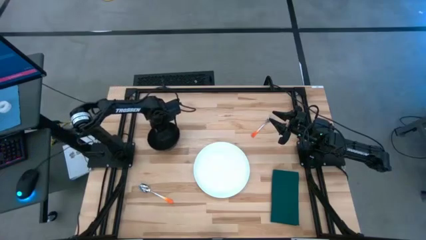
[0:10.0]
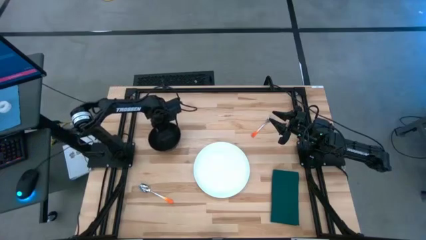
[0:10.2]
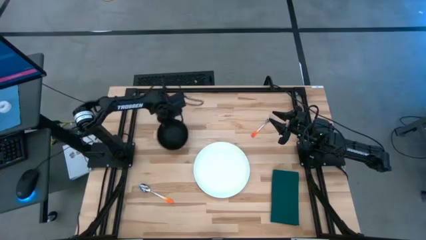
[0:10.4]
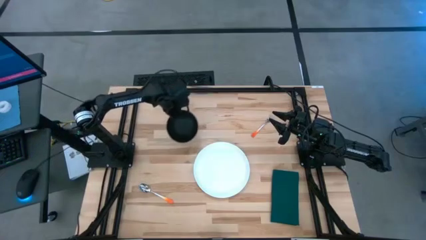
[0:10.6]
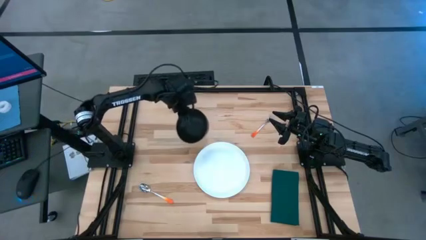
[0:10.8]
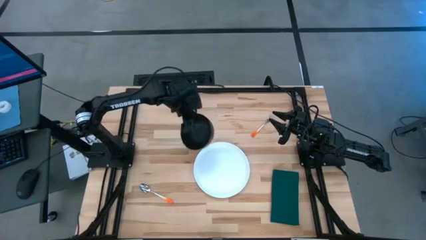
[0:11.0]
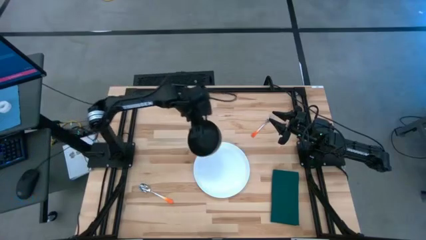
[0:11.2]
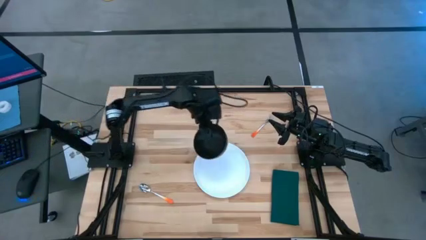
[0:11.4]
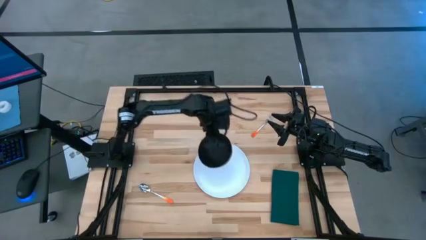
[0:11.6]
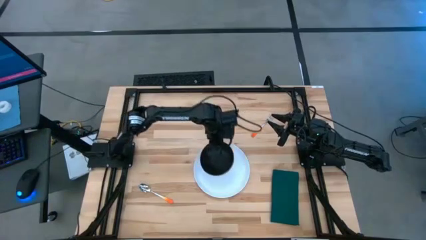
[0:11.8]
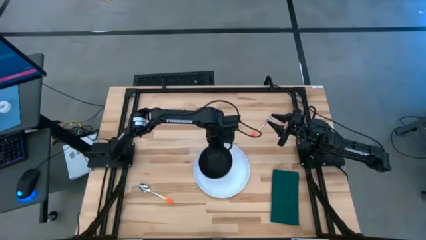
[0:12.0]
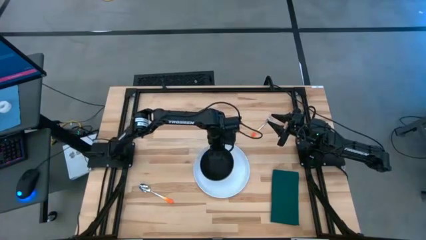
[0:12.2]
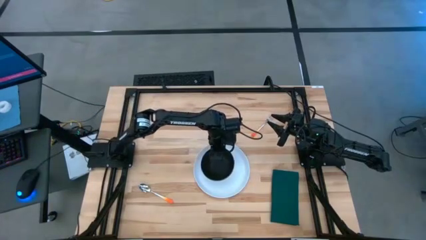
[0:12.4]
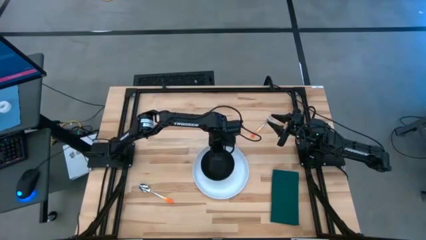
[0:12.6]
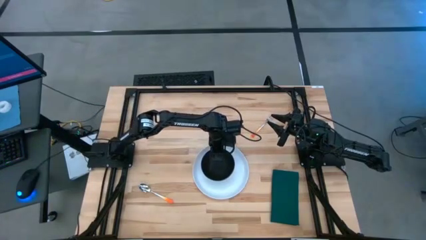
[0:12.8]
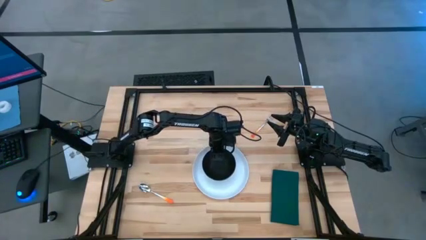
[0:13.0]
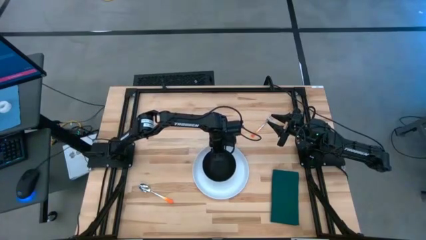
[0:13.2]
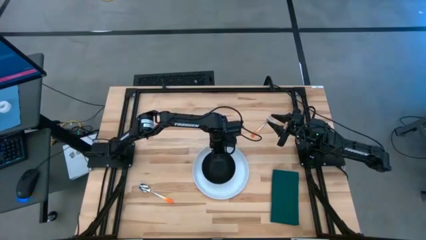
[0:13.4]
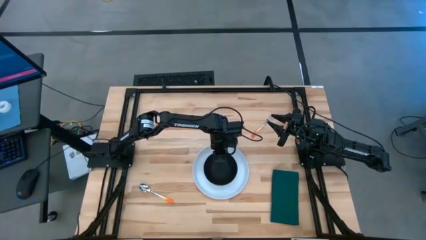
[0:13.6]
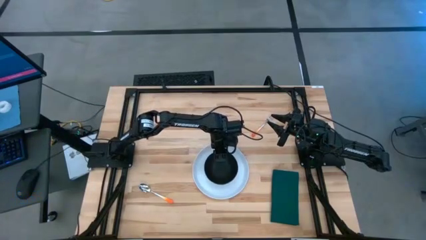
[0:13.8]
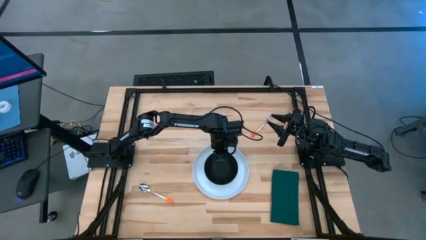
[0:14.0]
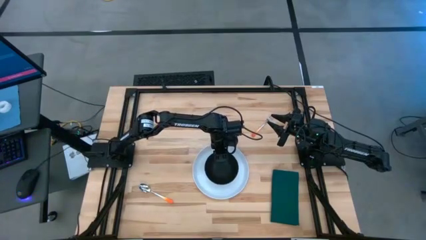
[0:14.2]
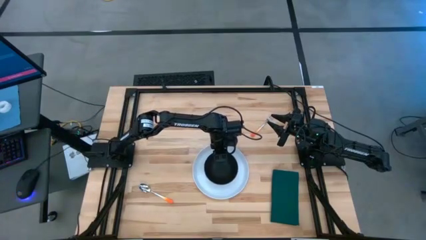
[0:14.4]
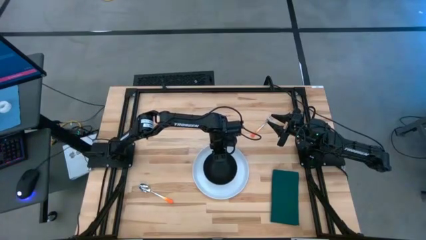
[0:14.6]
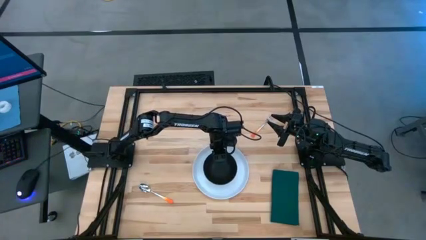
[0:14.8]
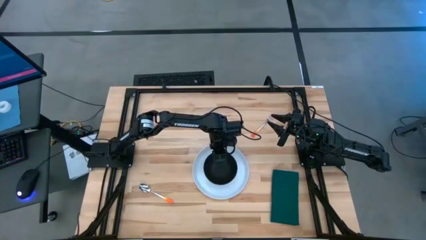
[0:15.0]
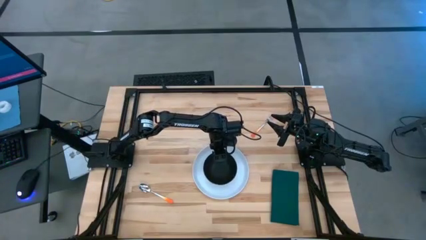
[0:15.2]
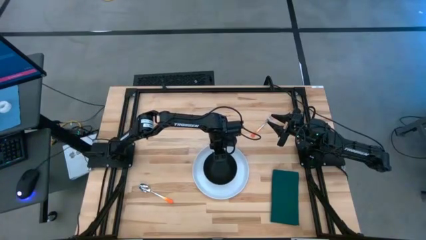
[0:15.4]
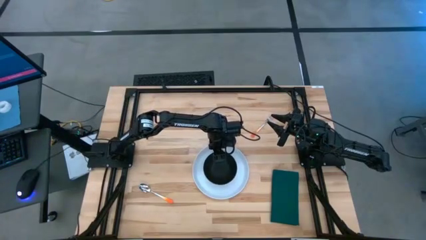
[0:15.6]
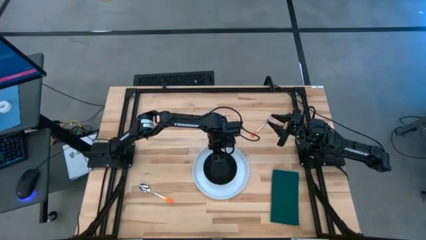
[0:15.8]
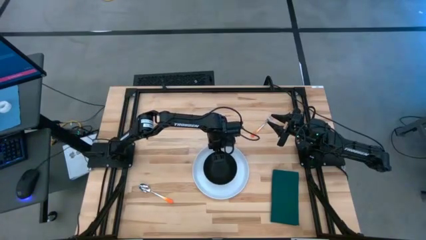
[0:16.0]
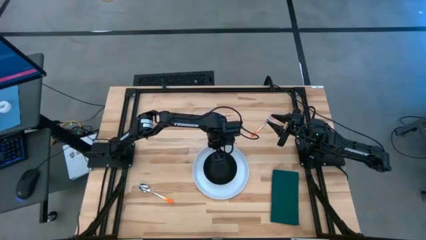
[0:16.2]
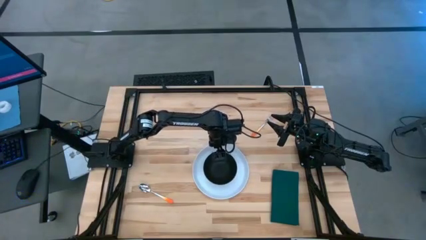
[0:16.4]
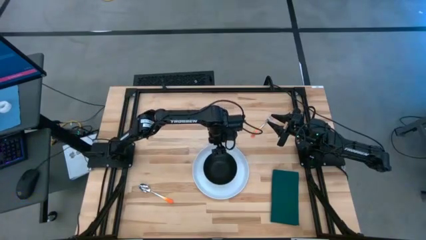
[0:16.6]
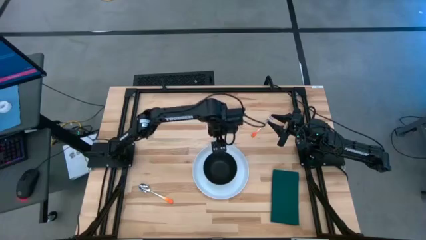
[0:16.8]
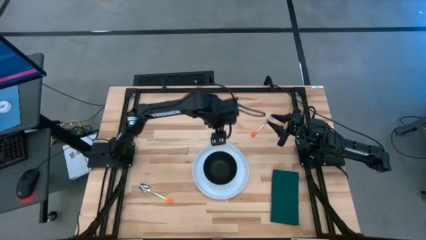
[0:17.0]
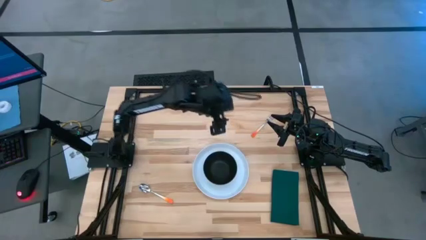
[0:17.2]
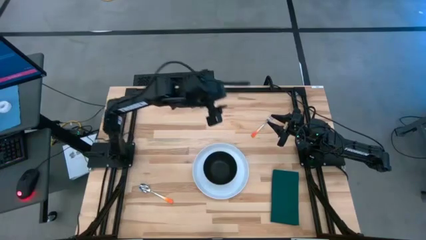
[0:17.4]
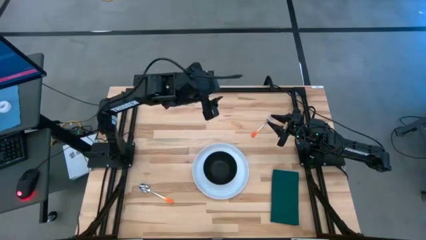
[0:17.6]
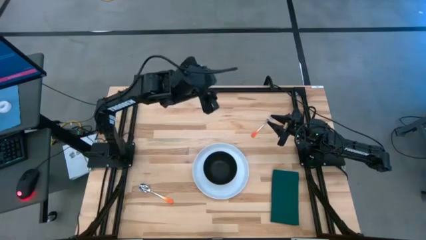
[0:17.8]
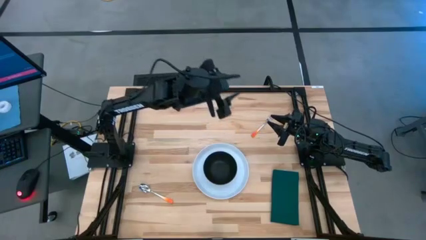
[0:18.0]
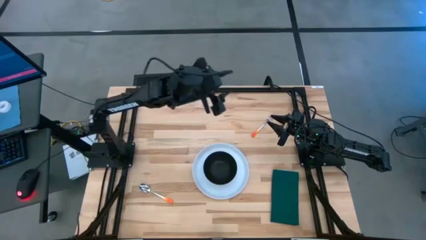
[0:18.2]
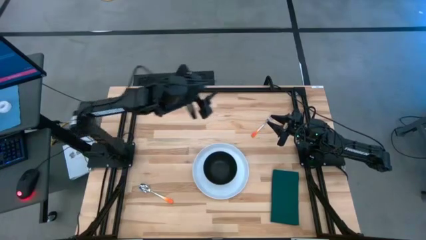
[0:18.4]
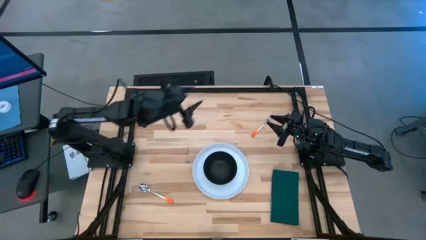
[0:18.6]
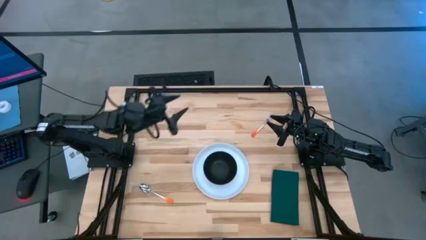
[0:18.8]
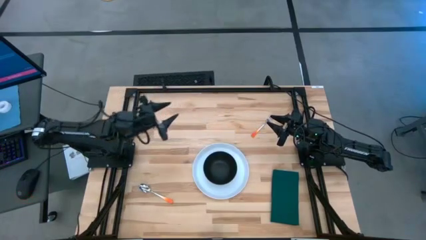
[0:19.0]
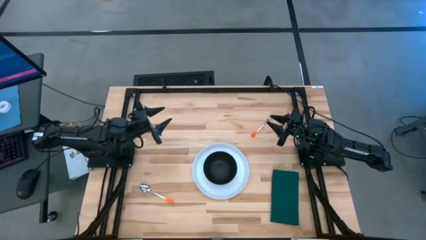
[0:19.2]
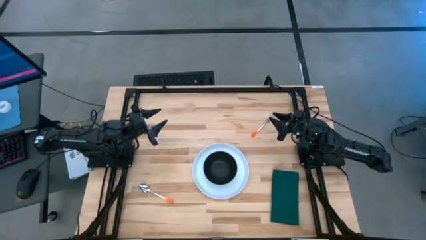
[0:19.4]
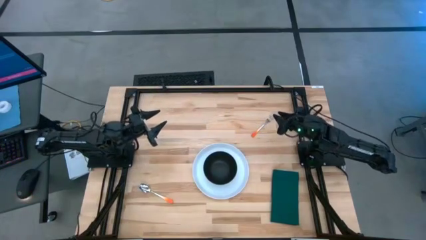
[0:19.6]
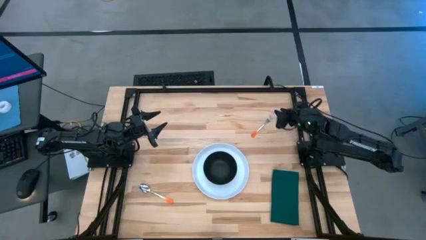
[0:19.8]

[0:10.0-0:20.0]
Task: Set table place
Place the black bowl on the white plate
